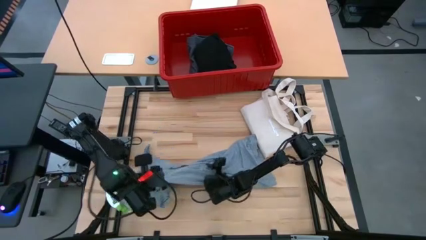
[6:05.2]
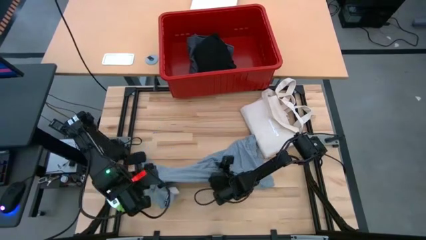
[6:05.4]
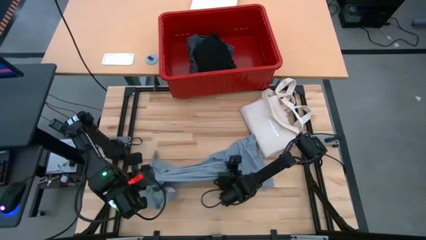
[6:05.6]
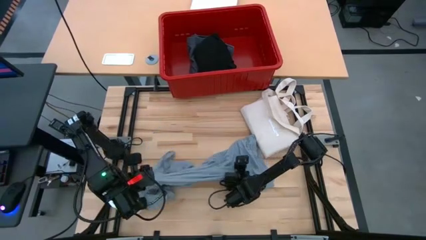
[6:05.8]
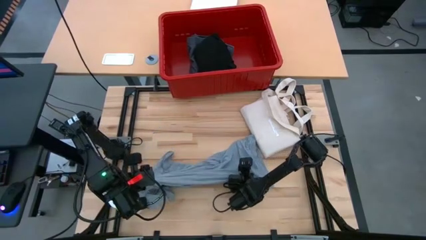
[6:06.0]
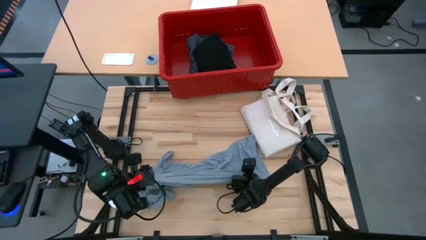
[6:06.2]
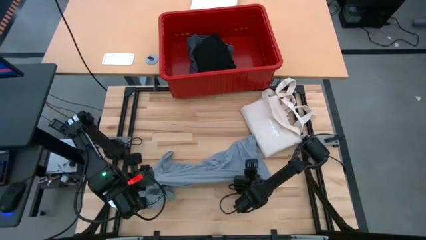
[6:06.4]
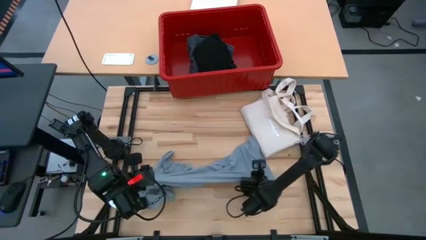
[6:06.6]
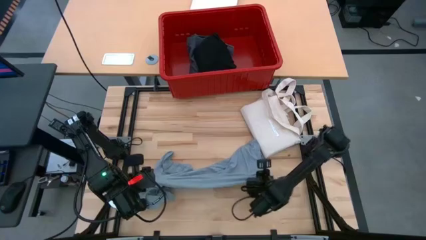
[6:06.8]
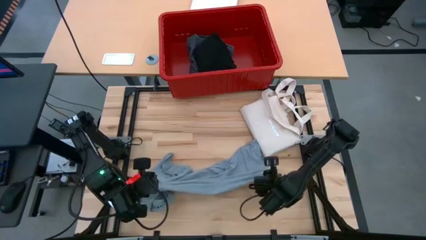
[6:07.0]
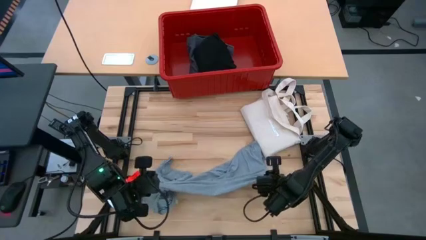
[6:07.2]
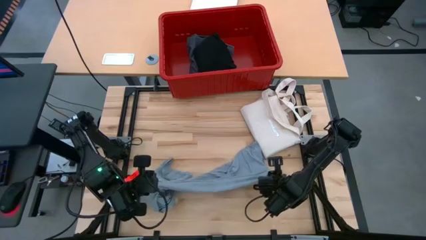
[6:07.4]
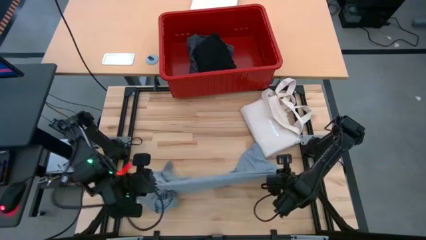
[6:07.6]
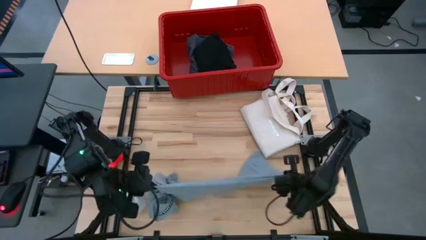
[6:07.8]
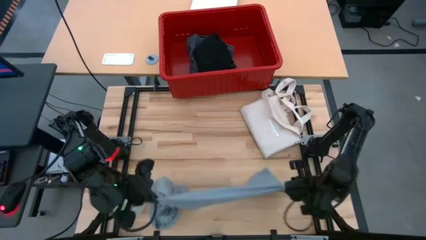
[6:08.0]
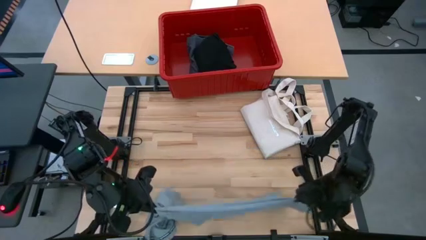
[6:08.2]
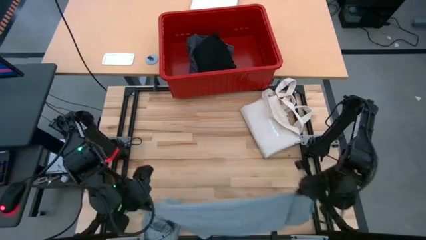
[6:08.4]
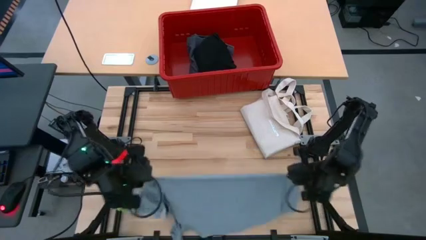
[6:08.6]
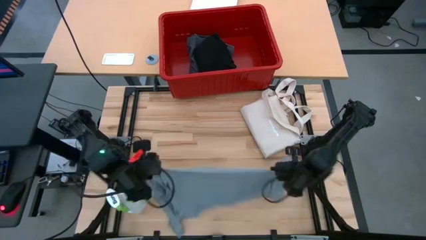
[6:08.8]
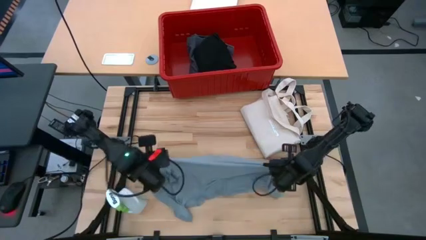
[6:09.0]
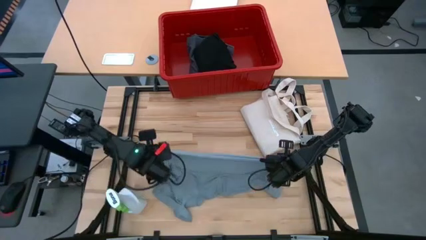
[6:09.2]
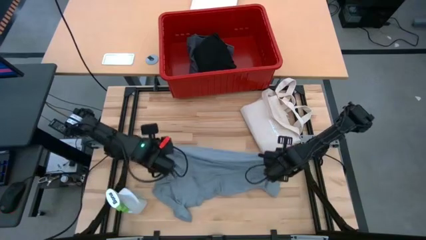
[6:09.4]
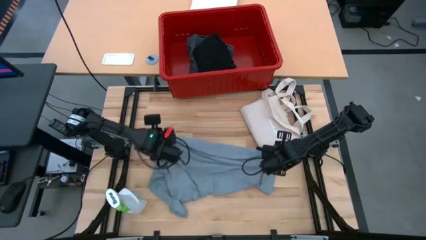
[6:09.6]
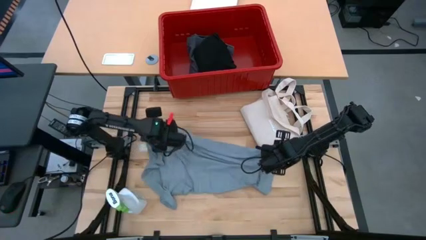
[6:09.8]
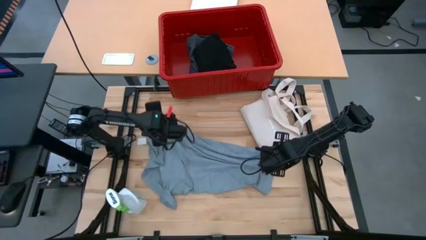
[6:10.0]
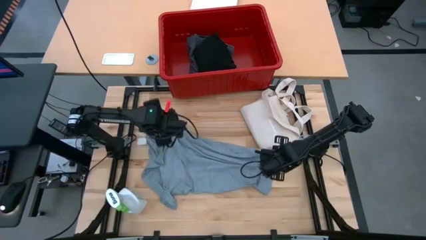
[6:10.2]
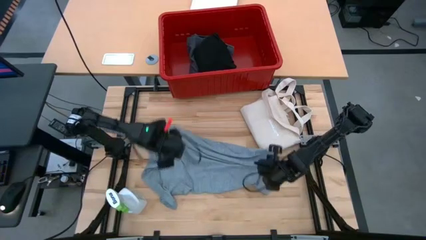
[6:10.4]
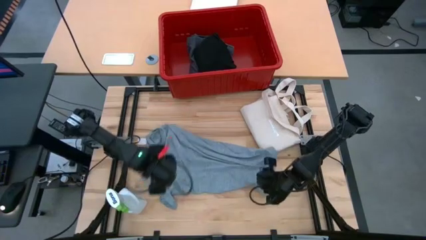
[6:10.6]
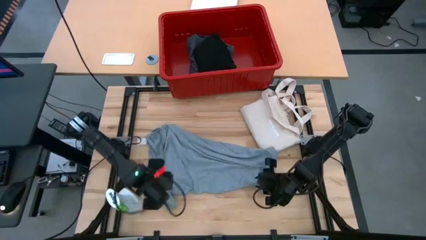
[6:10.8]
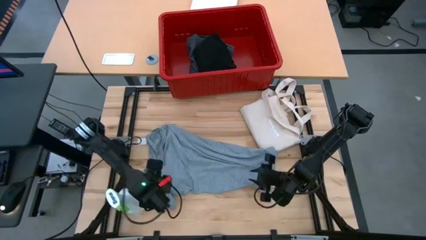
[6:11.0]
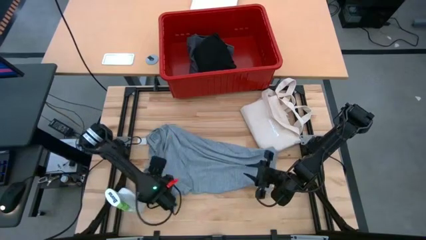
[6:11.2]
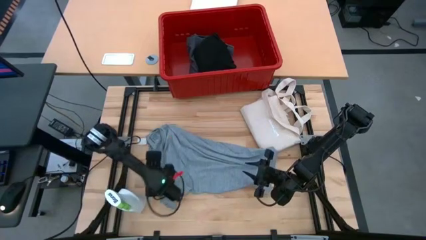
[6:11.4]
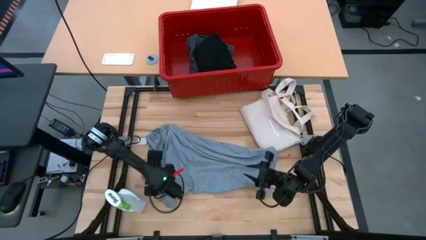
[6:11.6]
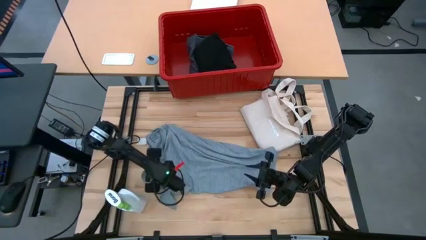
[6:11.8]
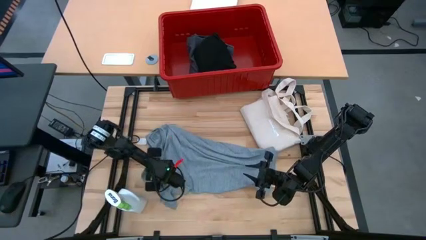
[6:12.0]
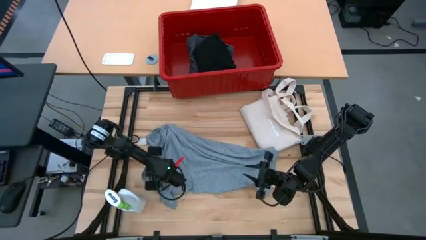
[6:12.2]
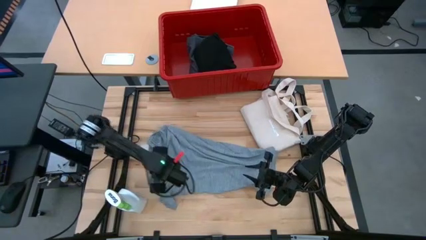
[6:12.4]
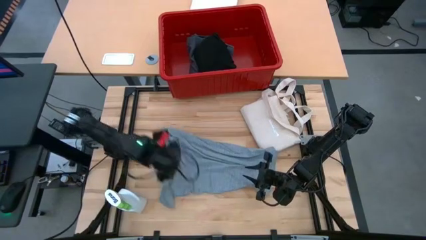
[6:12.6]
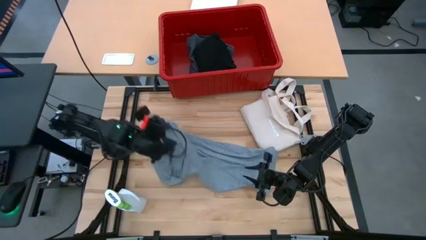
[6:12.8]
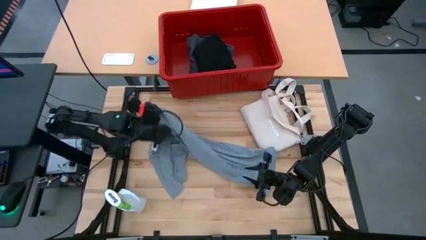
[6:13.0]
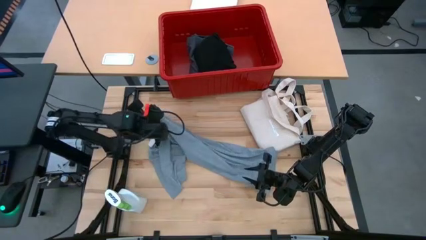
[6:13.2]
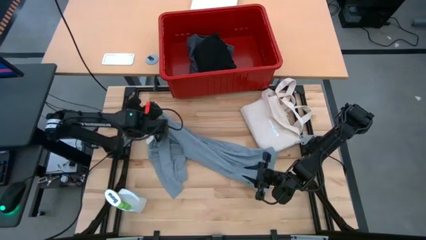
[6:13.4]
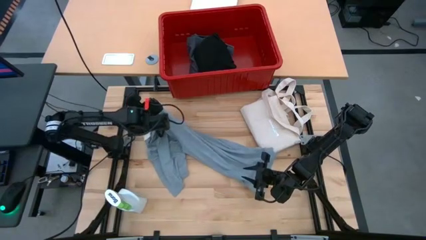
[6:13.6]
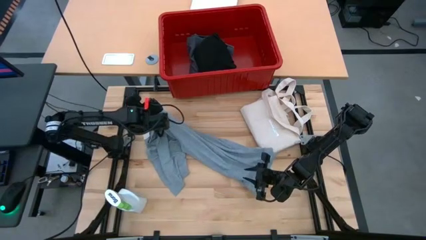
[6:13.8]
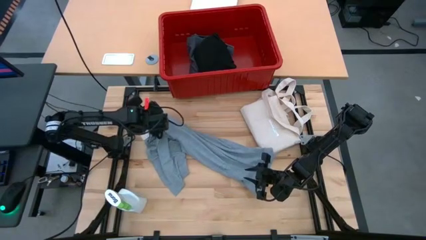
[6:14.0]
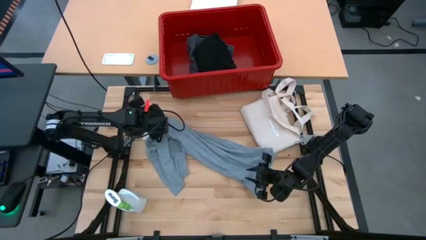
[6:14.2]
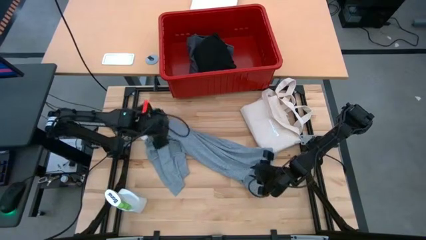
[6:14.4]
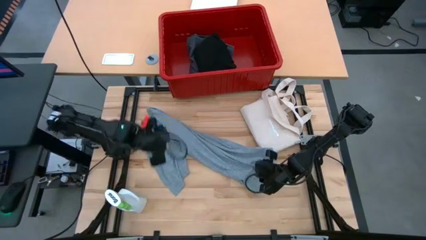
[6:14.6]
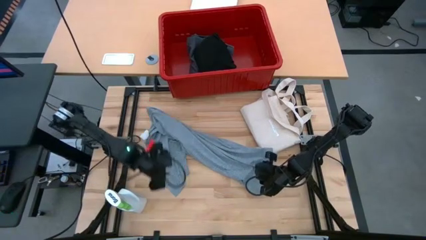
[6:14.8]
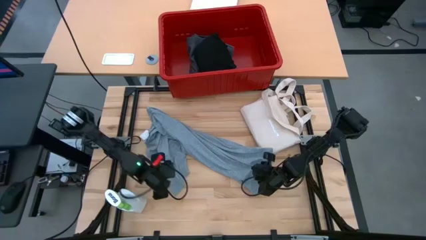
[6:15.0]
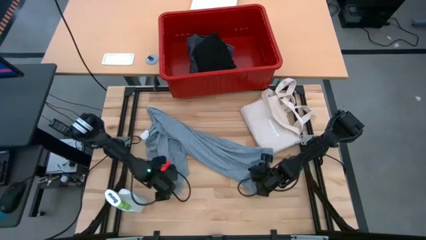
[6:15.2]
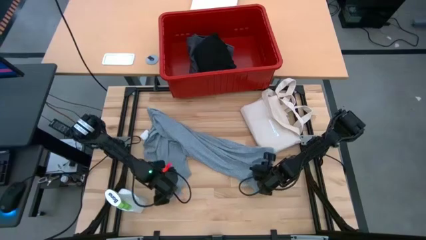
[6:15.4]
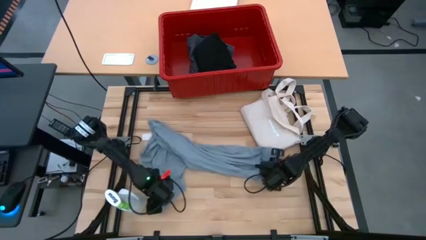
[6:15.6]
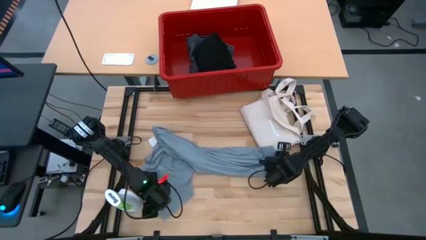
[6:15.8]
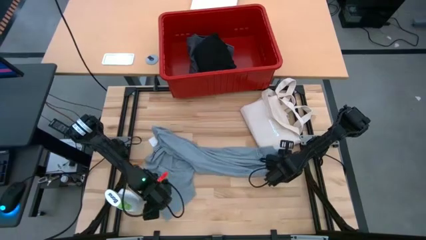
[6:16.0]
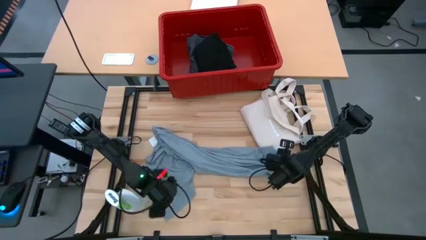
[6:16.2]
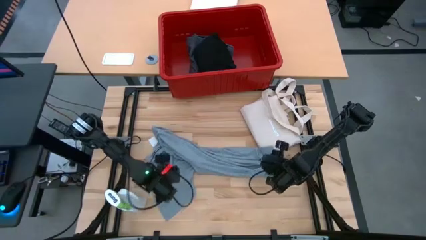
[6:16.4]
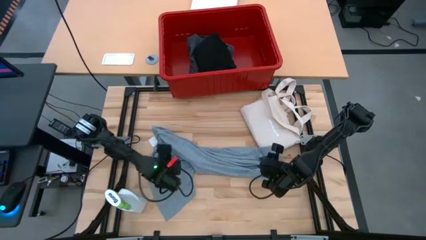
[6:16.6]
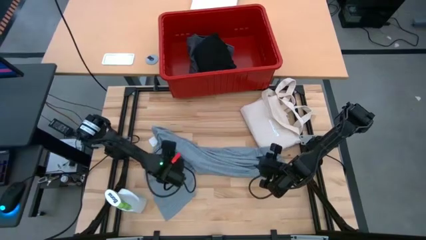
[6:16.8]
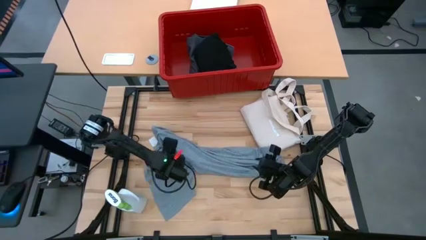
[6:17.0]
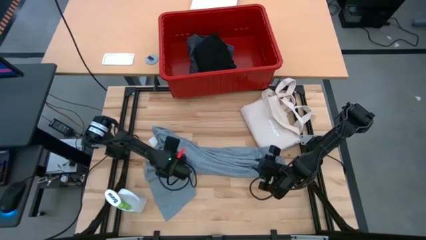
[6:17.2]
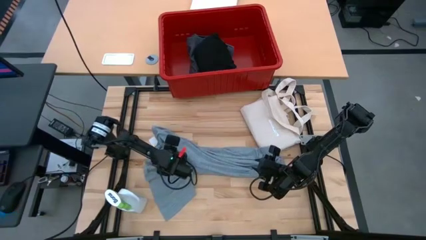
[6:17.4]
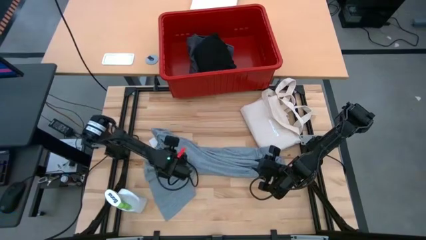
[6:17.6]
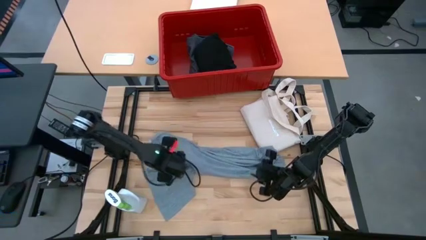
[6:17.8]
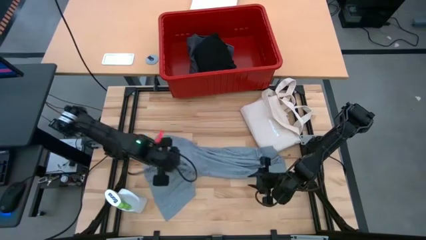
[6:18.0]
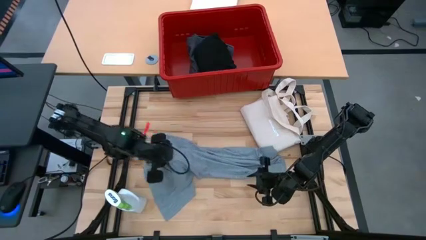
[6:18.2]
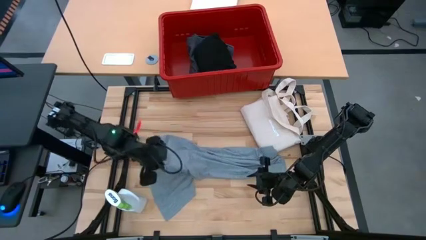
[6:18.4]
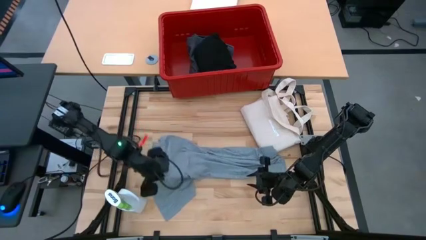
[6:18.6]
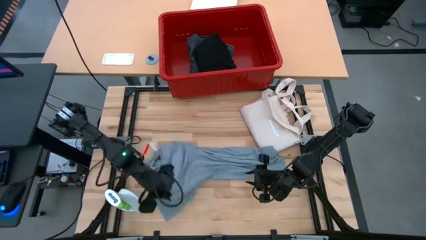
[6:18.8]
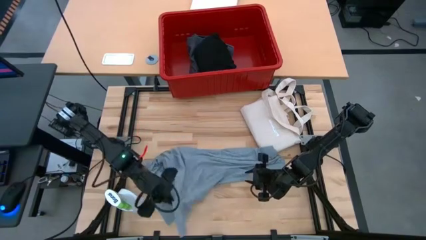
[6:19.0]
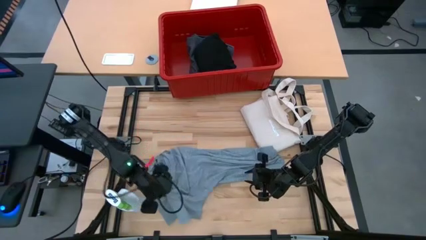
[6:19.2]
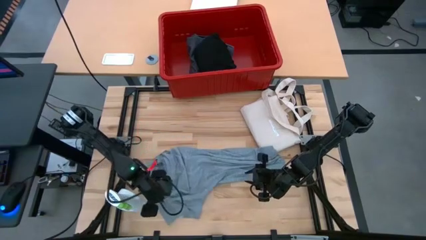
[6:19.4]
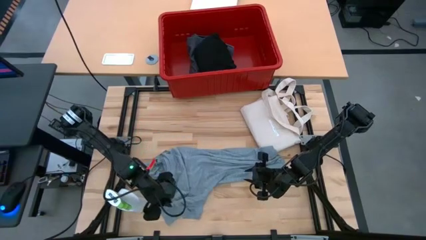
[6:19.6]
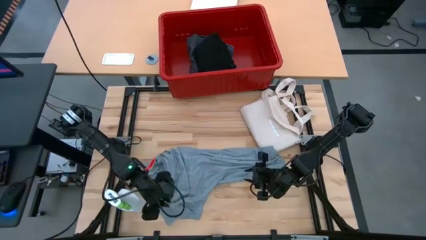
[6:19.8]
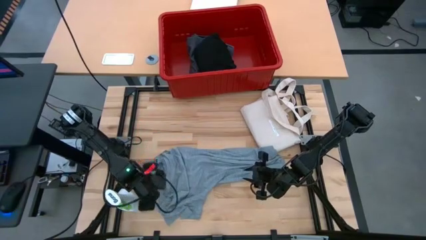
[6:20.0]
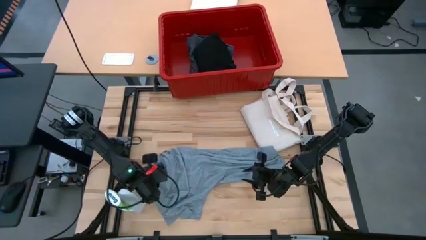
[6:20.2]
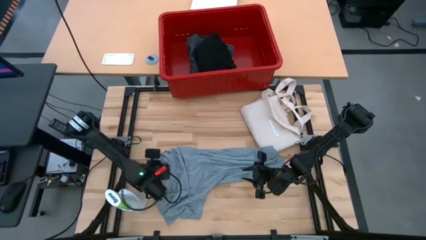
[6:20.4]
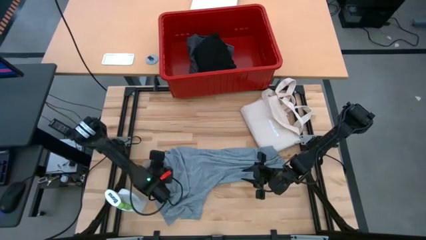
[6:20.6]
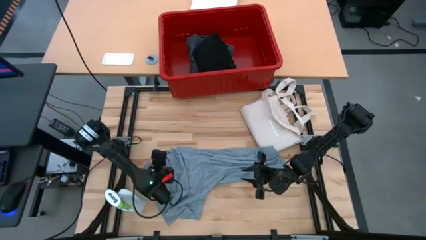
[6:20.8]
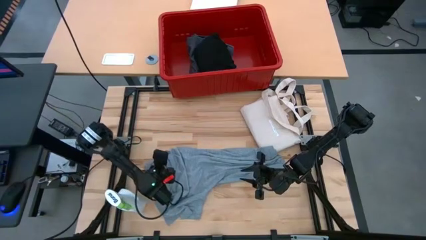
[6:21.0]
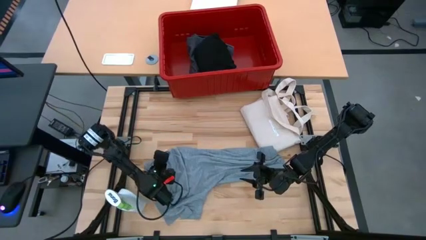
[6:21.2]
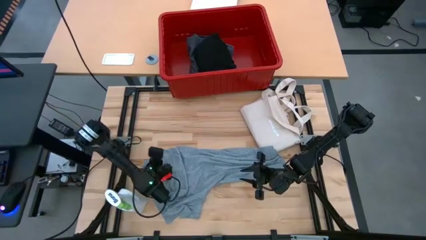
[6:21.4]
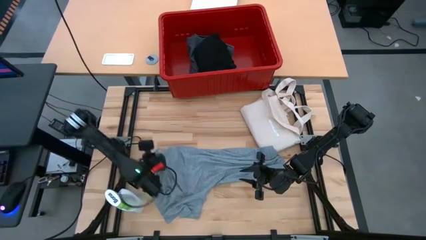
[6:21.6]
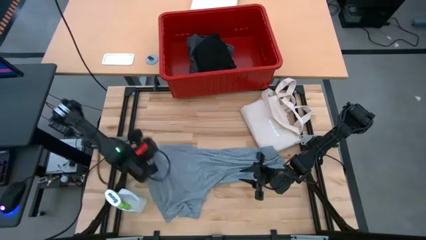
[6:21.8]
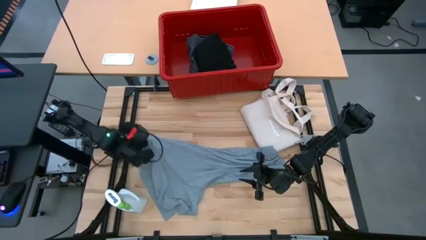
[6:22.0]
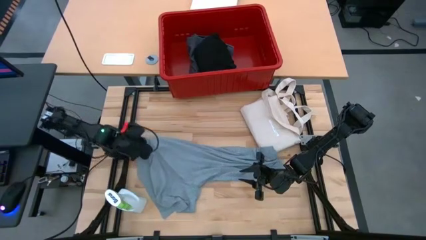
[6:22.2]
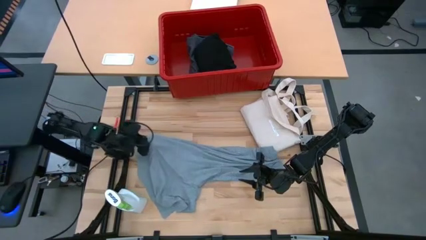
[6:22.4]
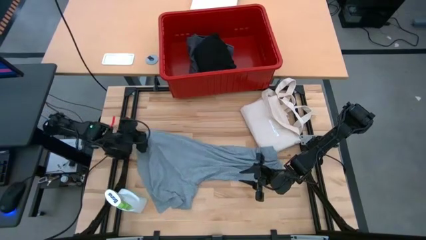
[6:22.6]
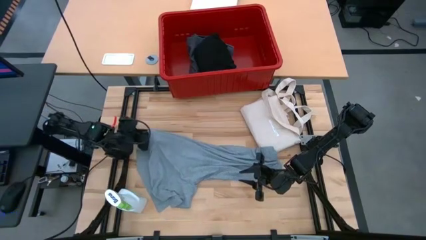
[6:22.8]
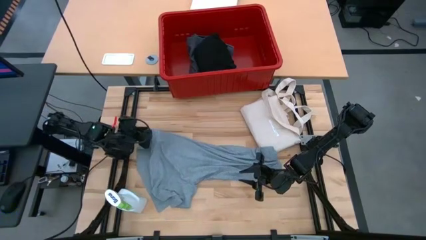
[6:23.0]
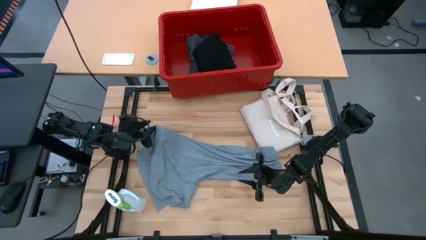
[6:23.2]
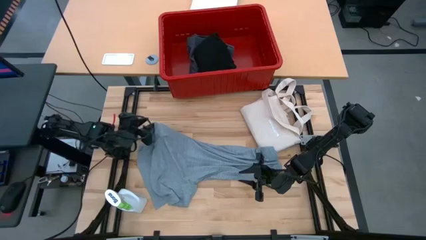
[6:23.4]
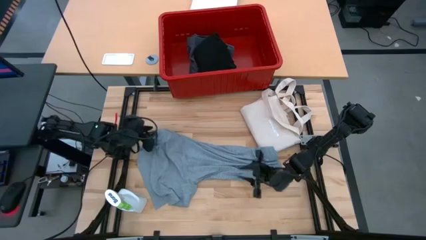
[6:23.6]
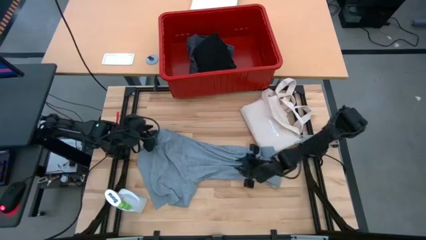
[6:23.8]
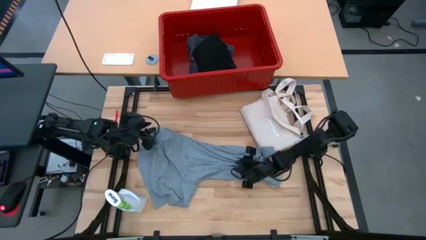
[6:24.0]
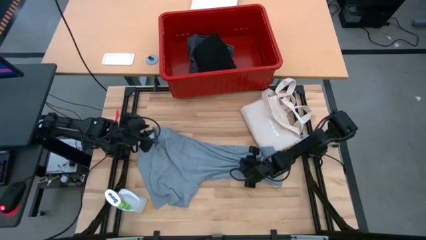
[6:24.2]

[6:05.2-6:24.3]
Task: Fold Laundry from Bin
Fold the gray shirt
